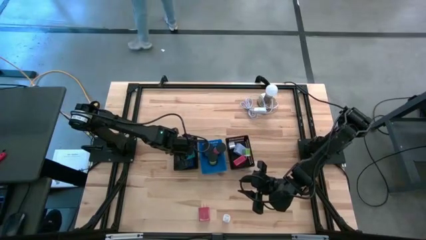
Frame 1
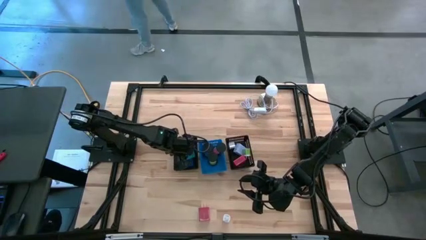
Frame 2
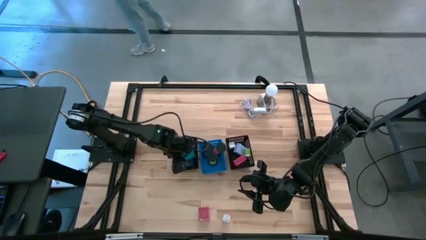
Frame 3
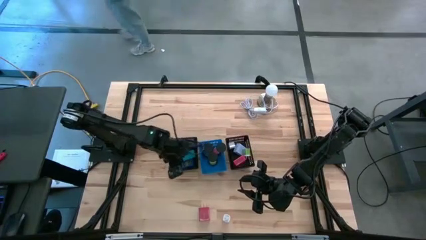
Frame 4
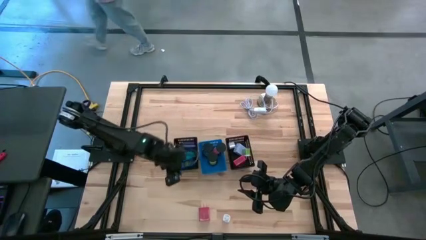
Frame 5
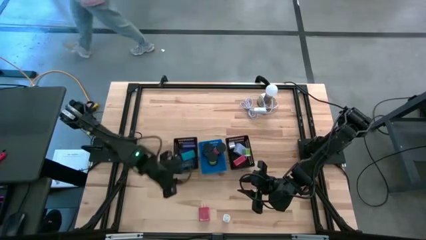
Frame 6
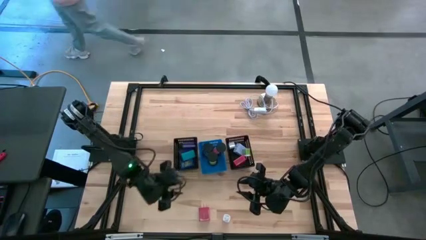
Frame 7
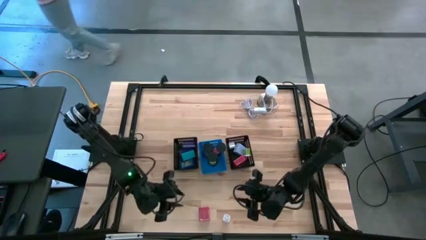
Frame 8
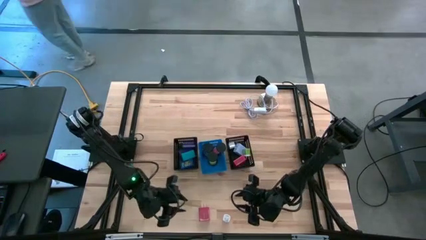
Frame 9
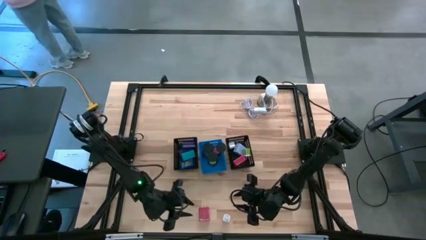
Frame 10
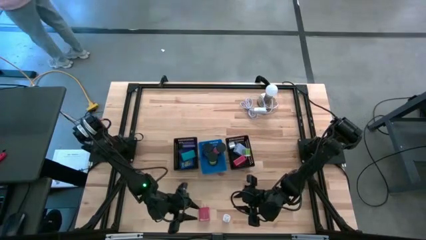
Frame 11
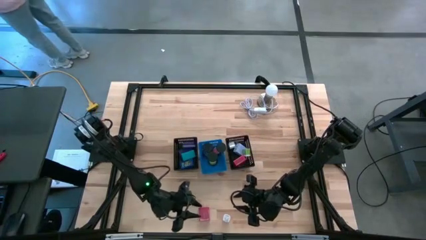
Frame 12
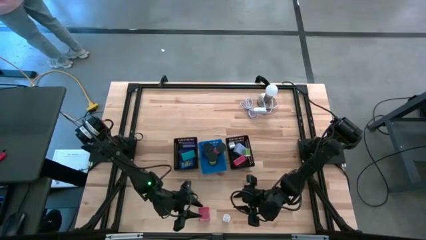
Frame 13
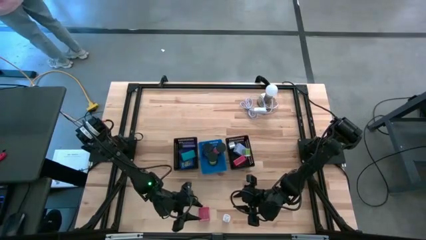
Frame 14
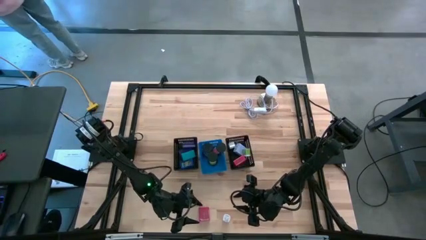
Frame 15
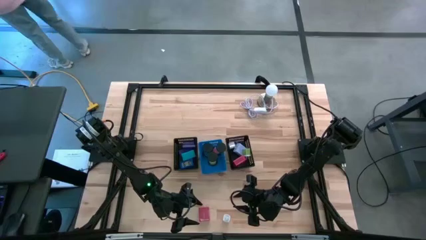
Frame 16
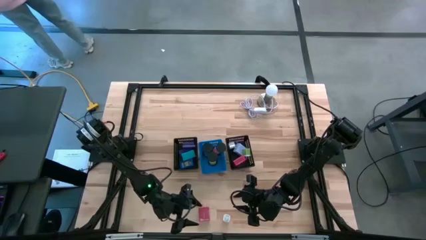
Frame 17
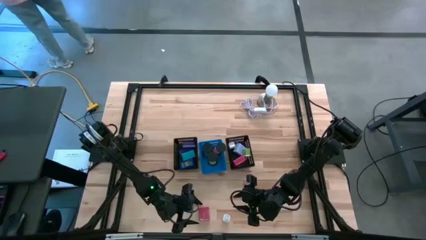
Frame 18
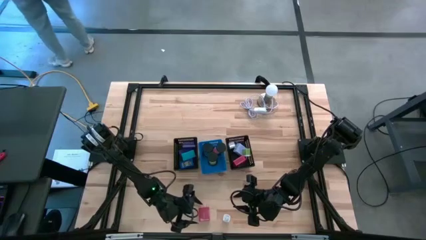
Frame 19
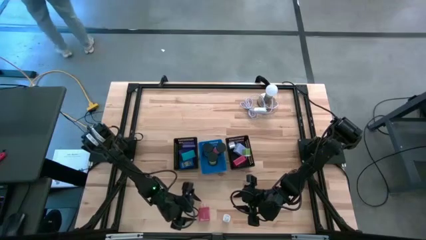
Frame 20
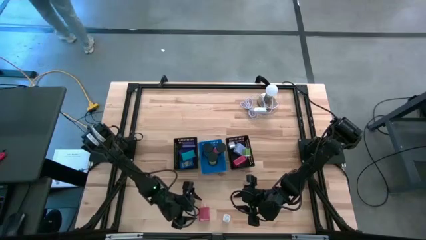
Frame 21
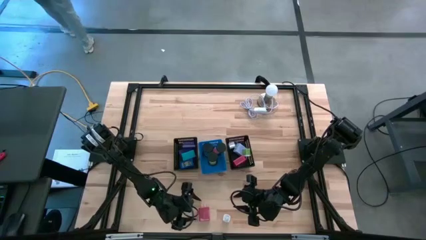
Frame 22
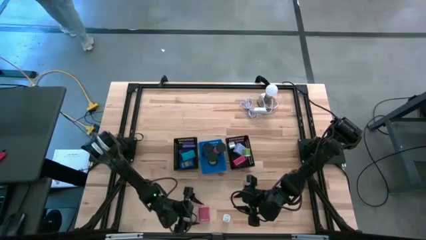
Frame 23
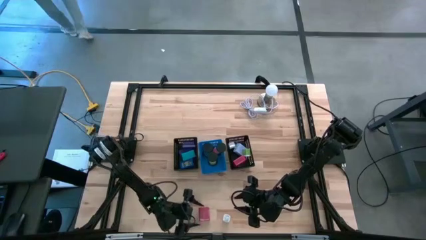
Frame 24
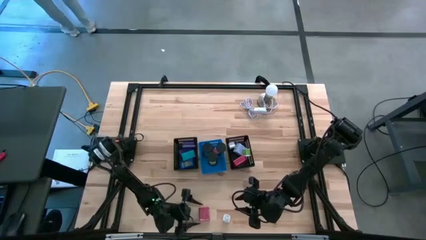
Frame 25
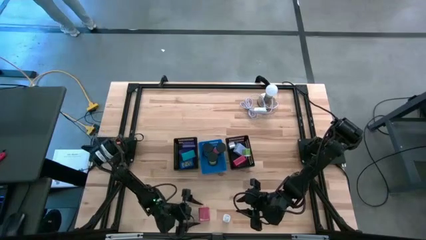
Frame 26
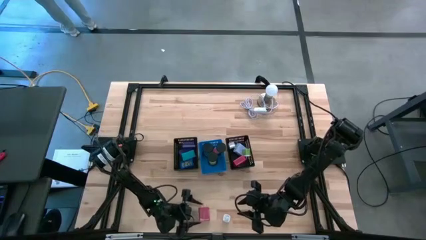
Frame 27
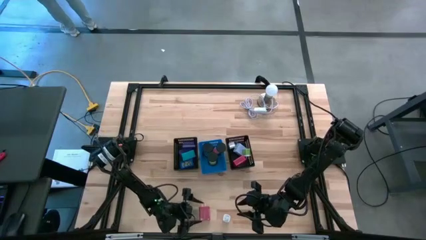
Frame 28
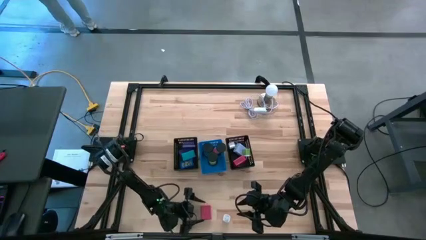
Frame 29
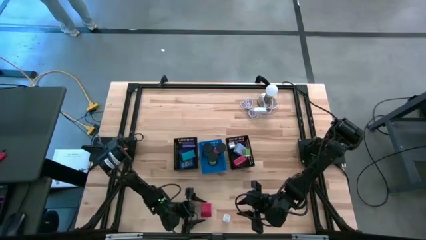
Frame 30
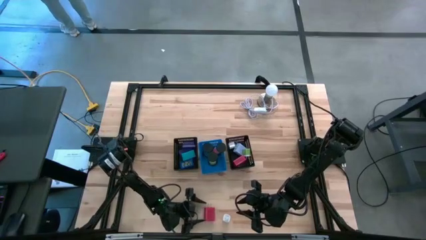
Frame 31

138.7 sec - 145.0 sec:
Task: Pick & Place Office items
Put the red charger adapter into the right black bin
